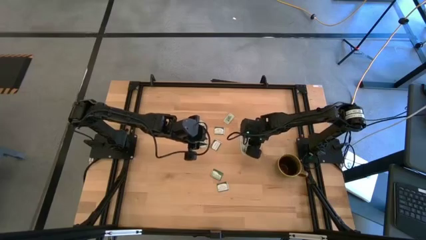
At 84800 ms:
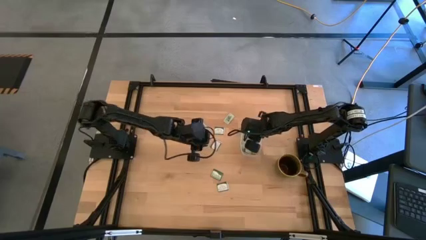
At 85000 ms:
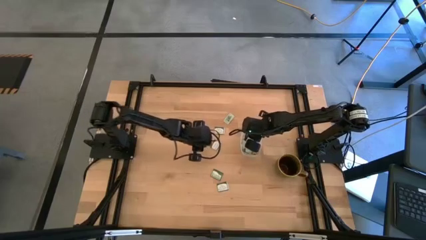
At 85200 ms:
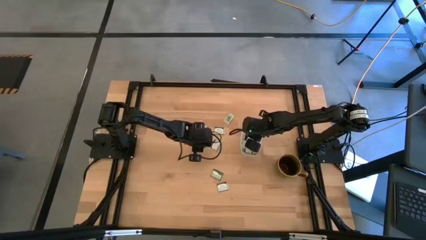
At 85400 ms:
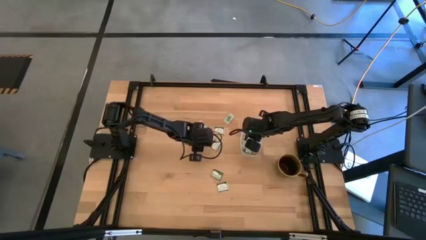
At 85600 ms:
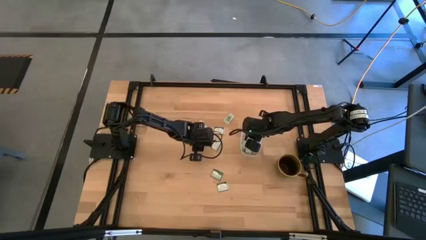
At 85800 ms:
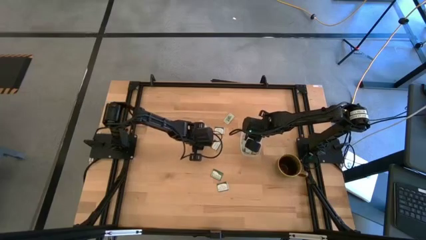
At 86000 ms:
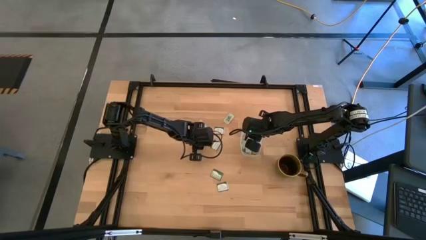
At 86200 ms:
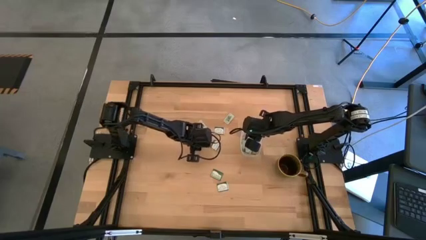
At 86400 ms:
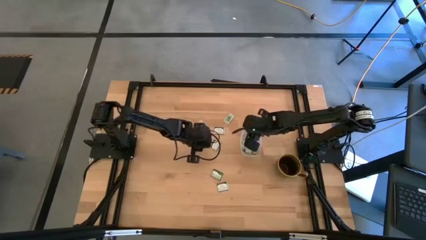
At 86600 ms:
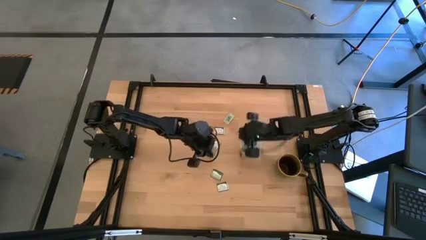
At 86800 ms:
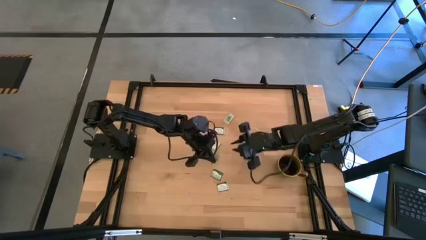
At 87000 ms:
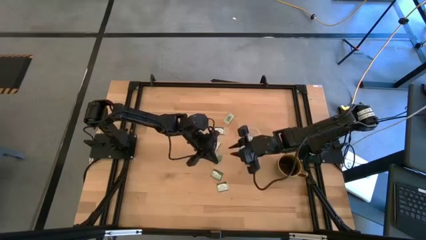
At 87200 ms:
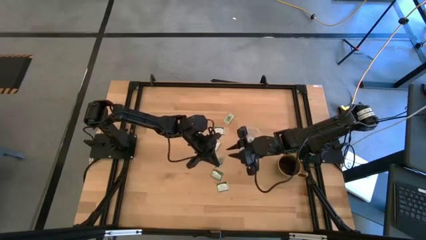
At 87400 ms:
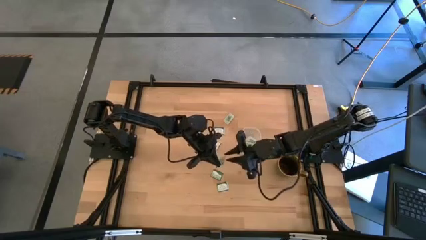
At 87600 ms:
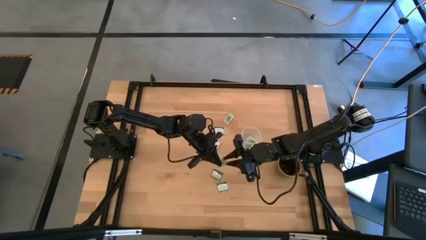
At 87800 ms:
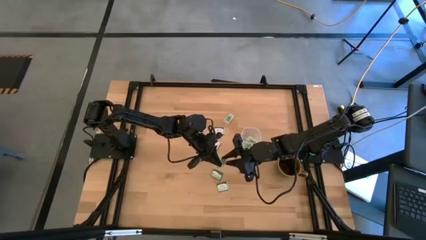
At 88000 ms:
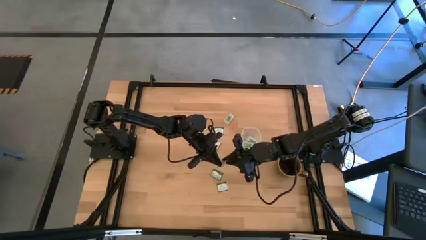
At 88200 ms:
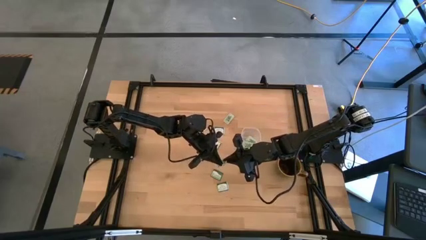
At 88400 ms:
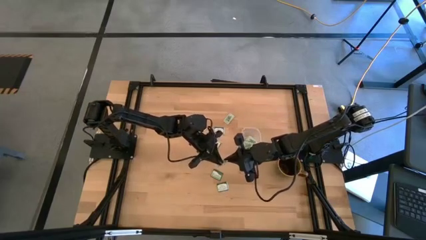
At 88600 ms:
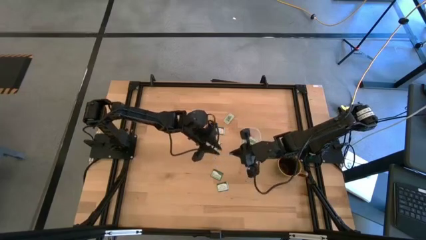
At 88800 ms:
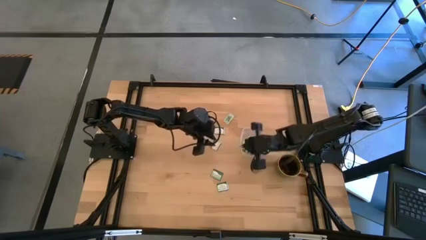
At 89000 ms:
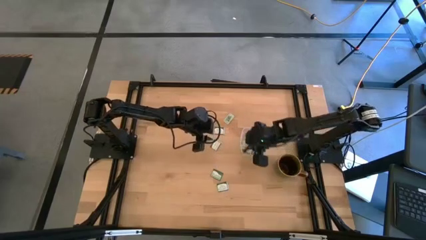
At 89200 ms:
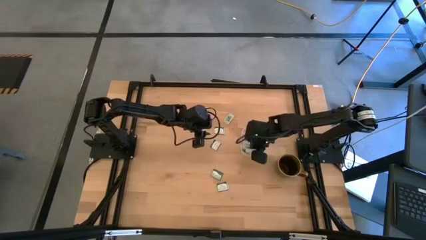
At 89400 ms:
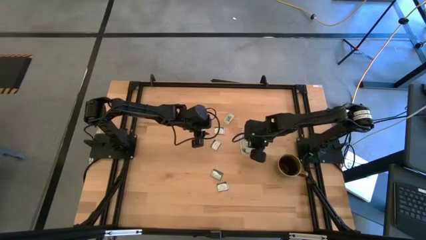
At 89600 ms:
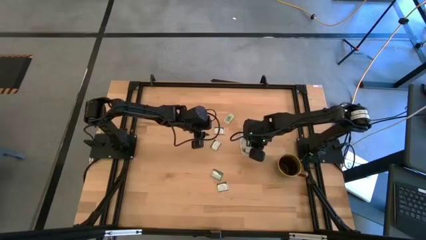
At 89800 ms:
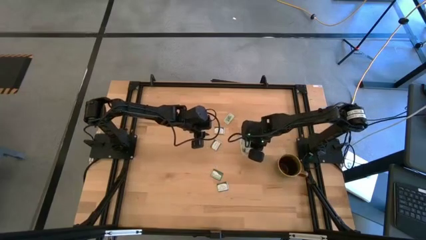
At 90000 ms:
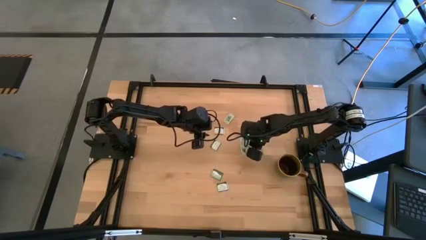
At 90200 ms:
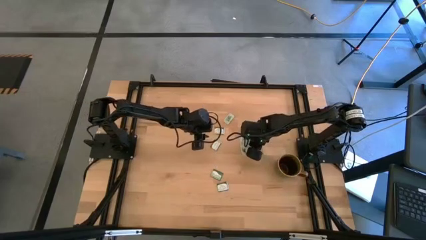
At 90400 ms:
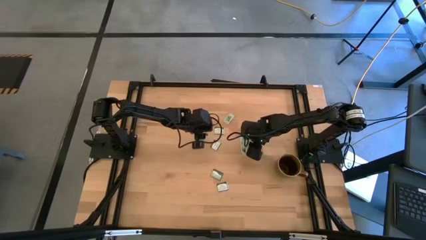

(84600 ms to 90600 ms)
Task: Pick and place items into bin
Put the stevia packet into the transparent bin

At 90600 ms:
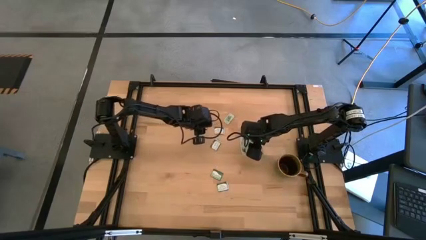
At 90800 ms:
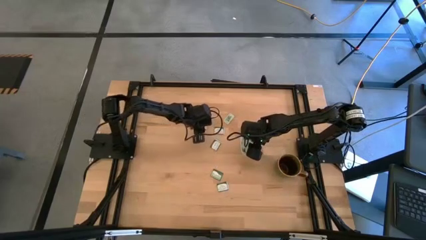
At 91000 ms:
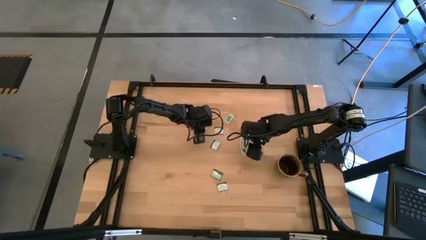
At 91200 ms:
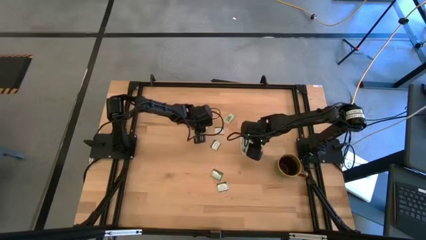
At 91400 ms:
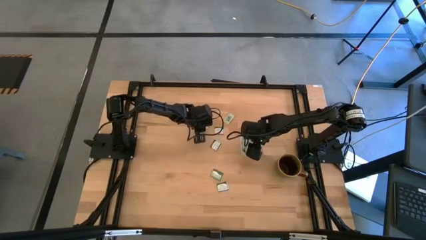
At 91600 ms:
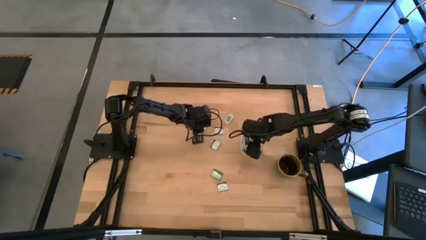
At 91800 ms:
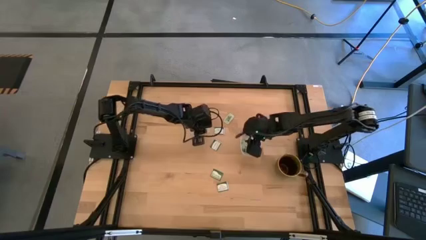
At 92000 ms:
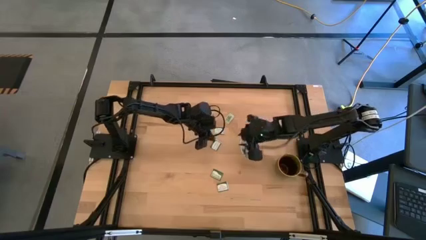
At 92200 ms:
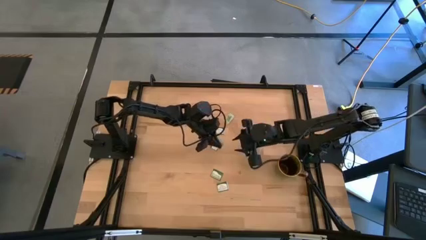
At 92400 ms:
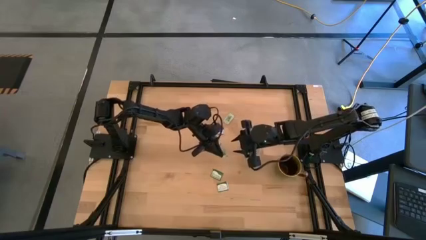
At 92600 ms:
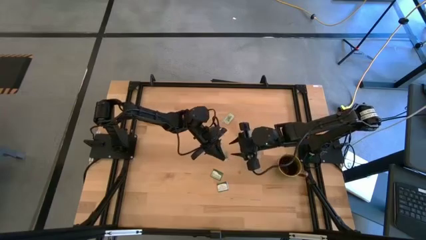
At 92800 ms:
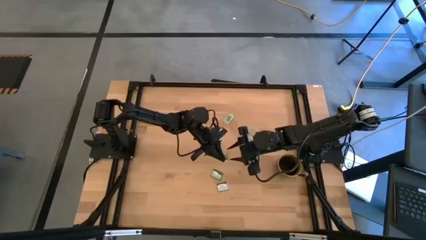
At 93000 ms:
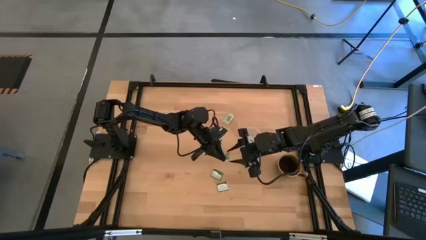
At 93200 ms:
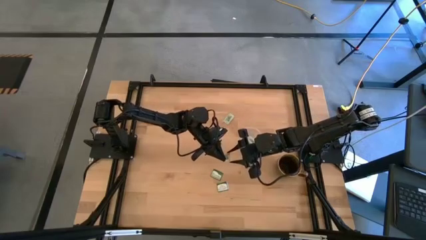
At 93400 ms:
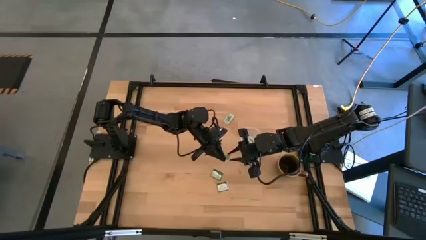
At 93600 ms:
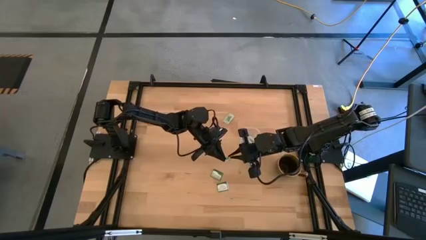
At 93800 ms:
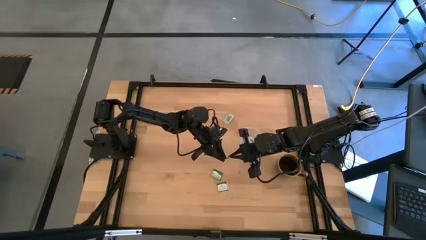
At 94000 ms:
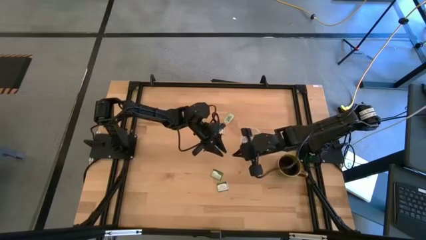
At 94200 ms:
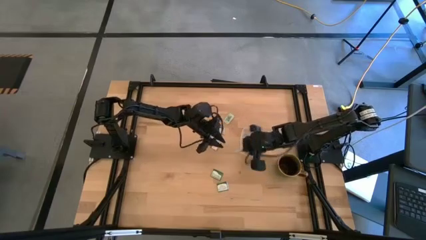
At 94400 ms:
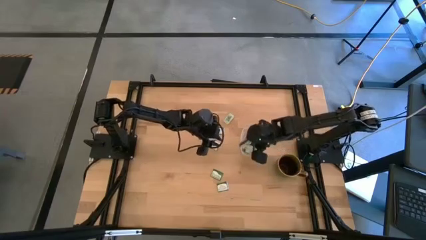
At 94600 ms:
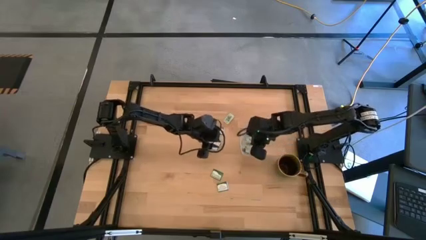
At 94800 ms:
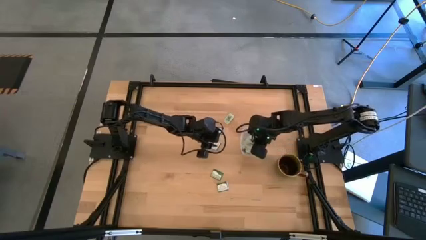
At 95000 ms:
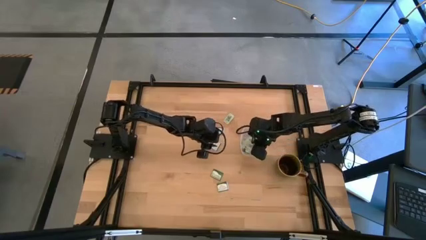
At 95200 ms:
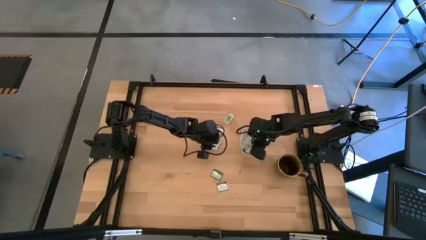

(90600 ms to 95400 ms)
Put the stevia packet into the transparent bin

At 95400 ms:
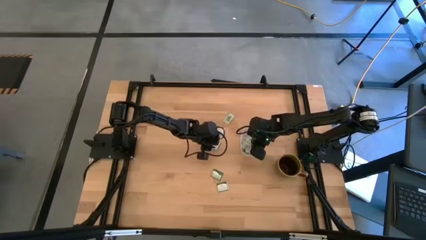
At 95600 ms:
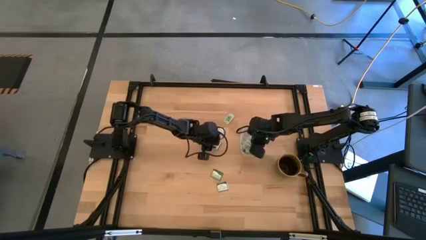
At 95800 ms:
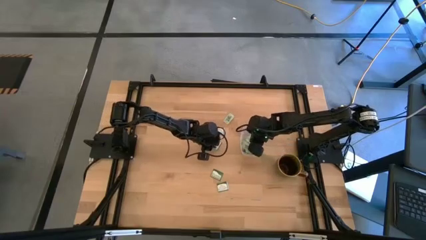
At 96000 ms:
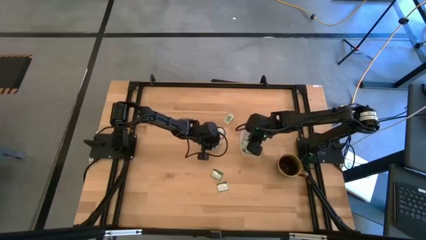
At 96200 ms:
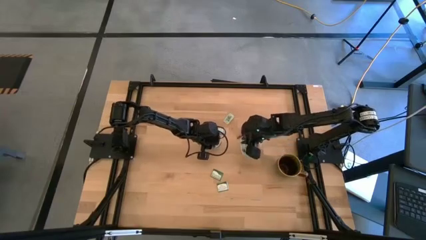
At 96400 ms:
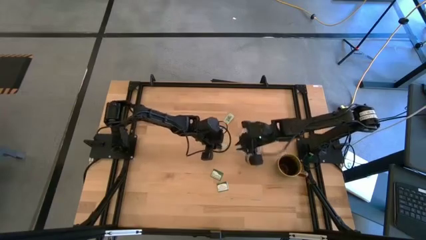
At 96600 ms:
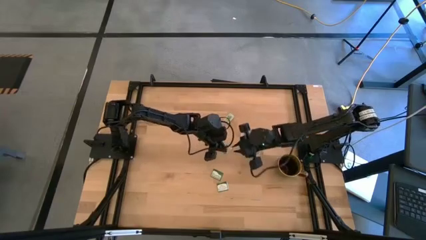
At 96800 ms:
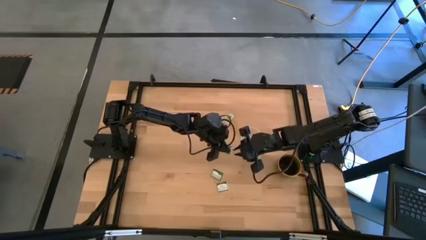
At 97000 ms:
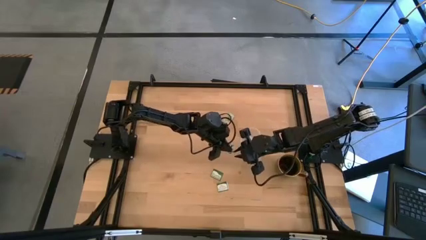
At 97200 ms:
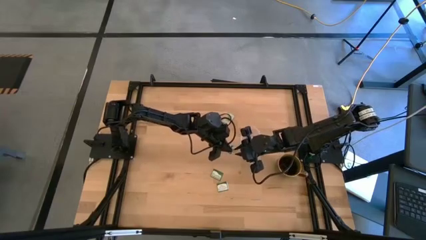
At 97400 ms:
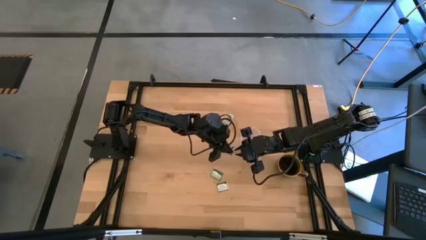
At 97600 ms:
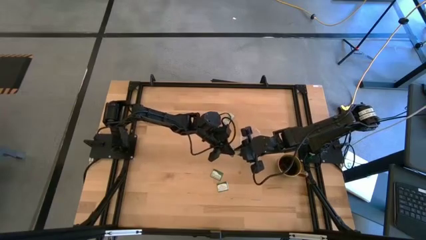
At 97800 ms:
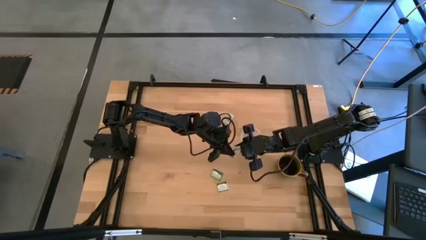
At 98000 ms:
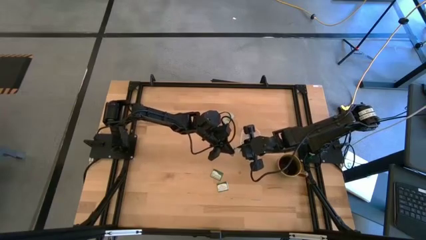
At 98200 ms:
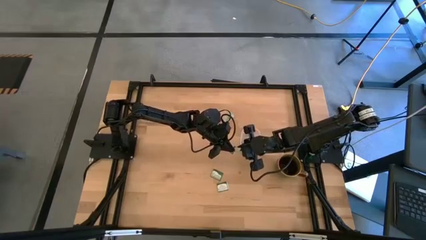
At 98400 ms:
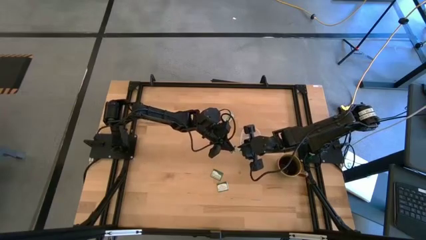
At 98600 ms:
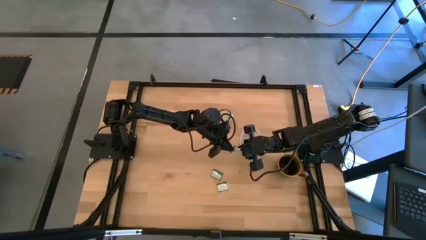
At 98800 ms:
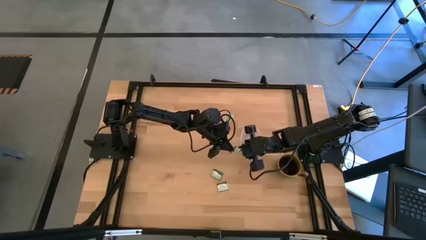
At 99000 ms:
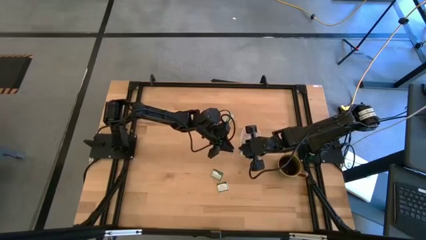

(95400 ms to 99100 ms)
Put the truvia packet into the transparent bin

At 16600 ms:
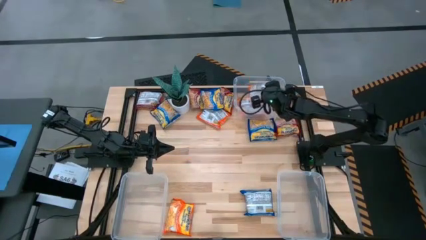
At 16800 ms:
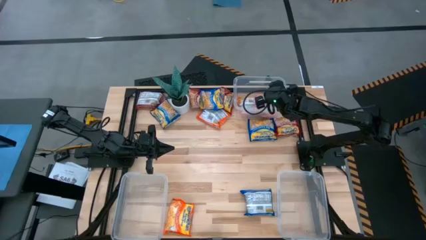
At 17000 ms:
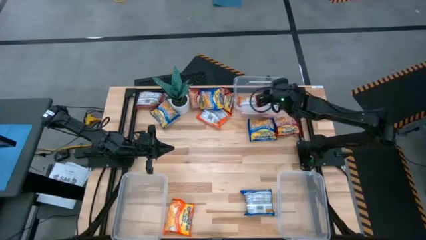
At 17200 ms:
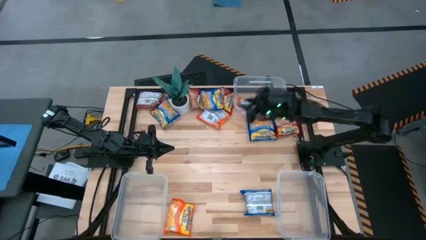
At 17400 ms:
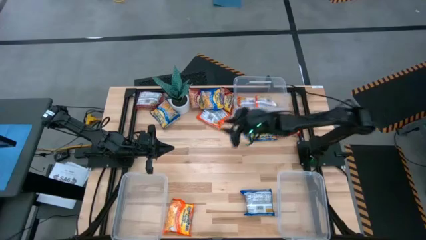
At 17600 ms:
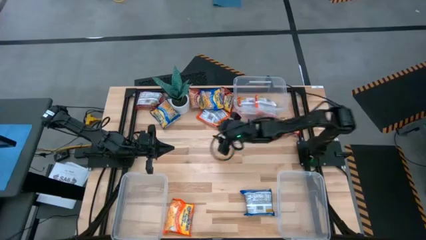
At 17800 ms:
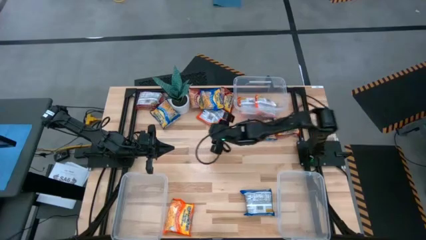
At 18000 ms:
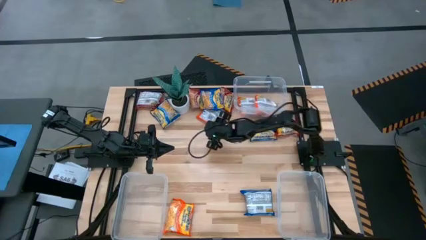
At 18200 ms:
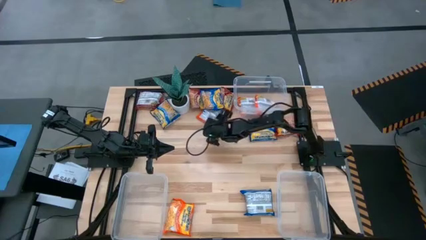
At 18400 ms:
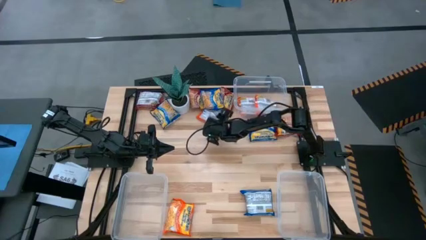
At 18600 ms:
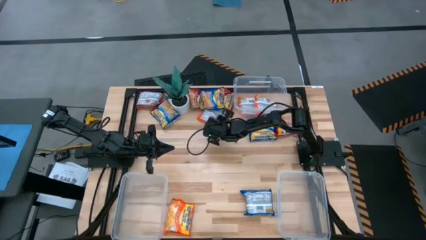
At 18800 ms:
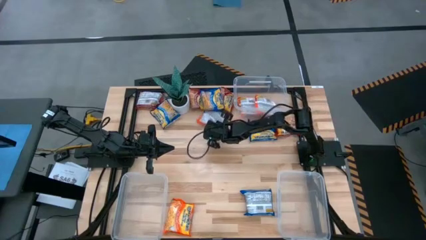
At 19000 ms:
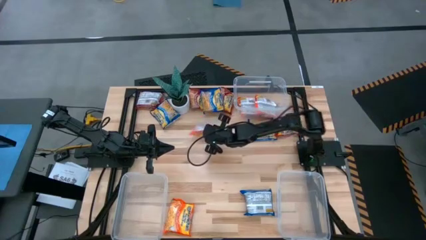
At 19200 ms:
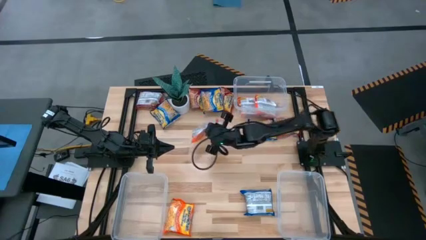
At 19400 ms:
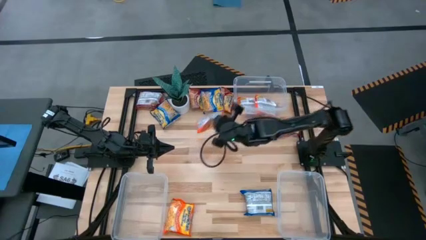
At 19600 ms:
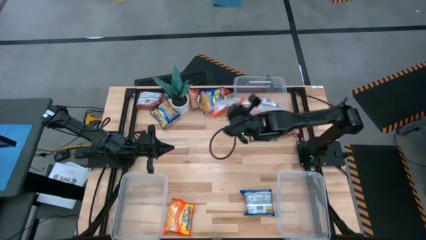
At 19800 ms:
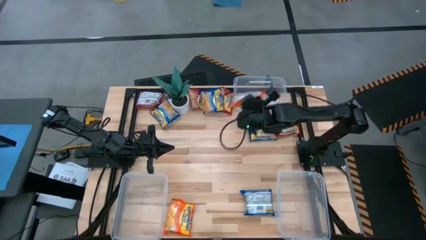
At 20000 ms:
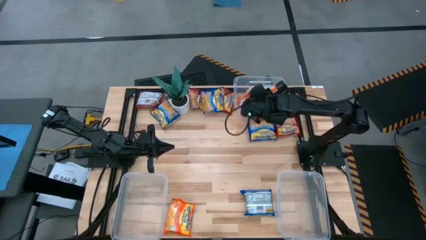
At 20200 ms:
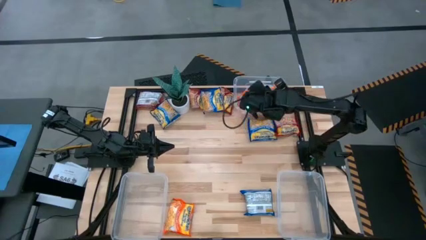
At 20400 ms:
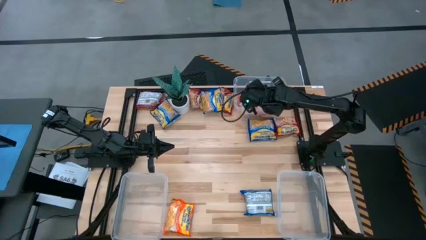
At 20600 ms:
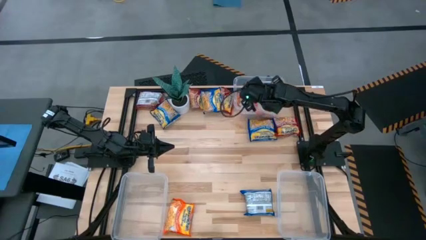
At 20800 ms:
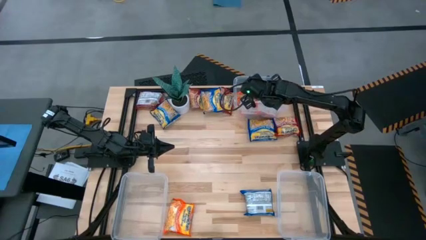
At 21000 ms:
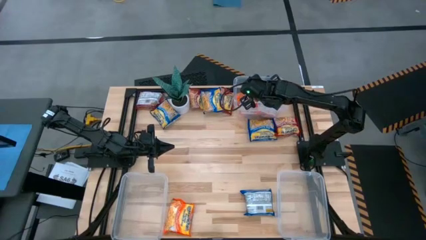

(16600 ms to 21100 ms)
Task: Sort Maruchan noodles
Put the orange noodle pack into the top transparent bin
